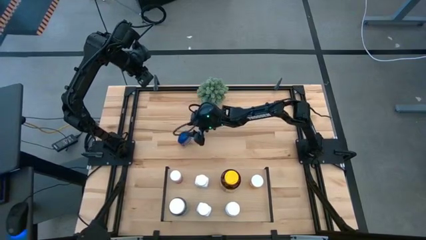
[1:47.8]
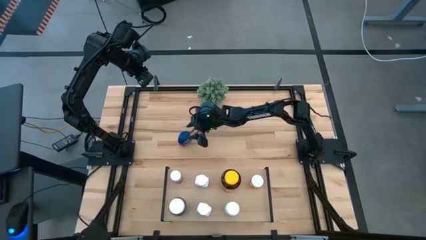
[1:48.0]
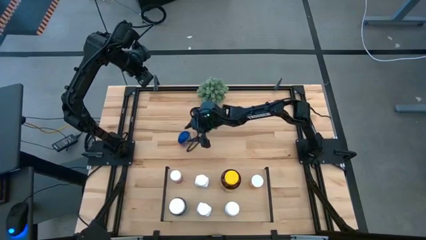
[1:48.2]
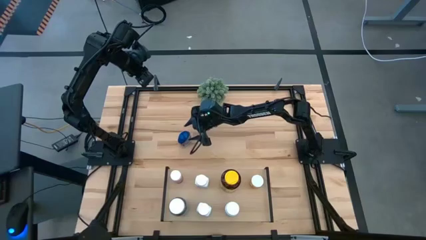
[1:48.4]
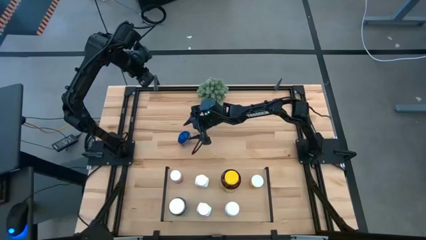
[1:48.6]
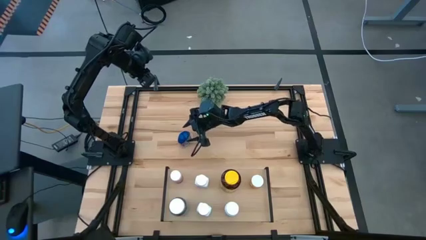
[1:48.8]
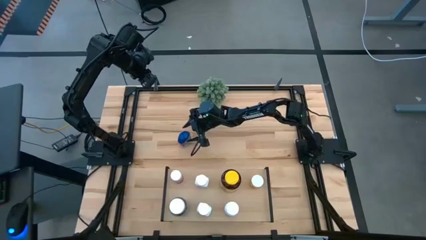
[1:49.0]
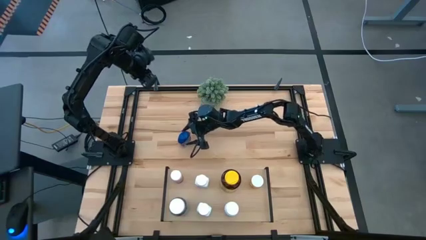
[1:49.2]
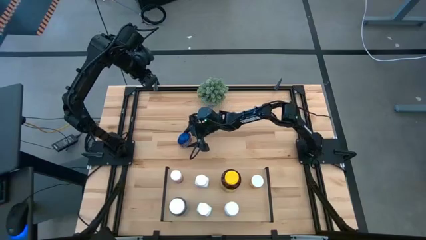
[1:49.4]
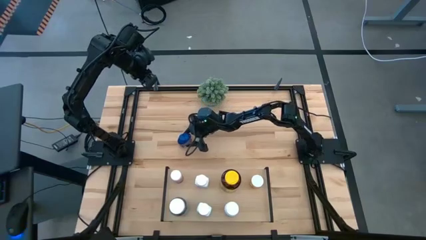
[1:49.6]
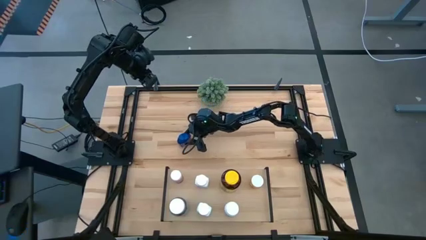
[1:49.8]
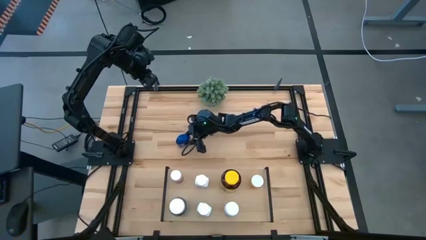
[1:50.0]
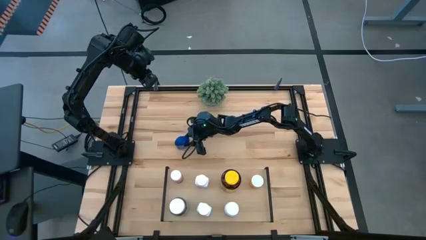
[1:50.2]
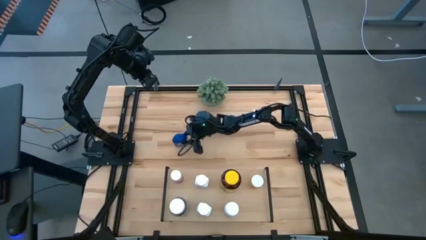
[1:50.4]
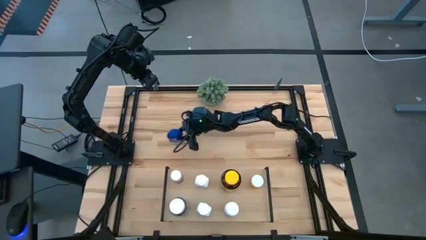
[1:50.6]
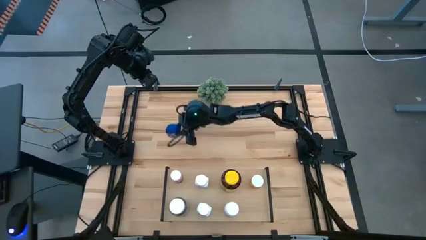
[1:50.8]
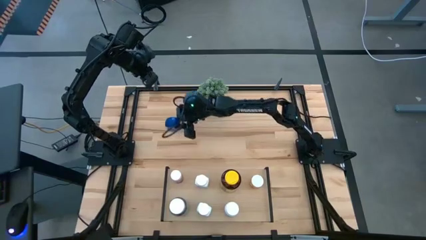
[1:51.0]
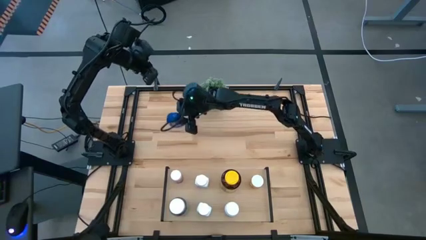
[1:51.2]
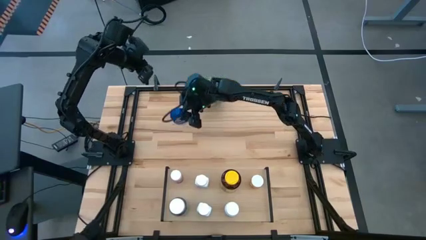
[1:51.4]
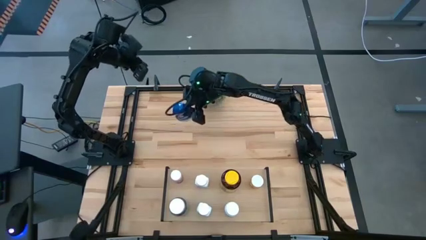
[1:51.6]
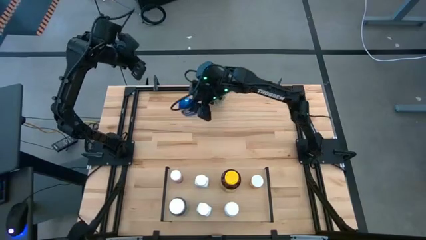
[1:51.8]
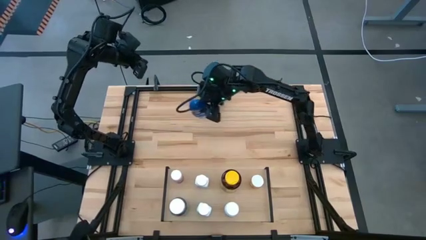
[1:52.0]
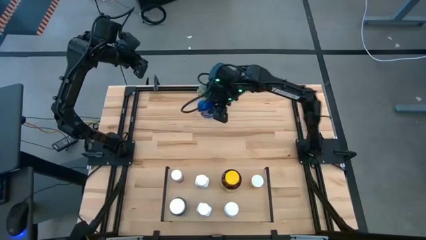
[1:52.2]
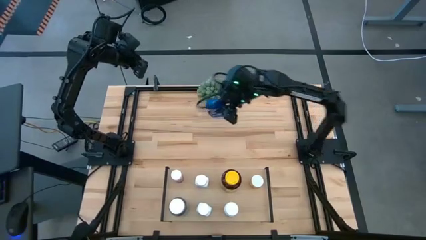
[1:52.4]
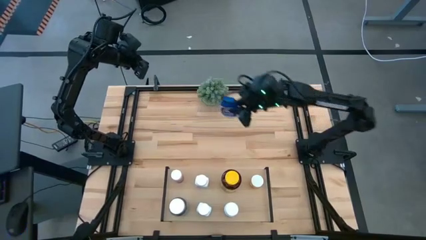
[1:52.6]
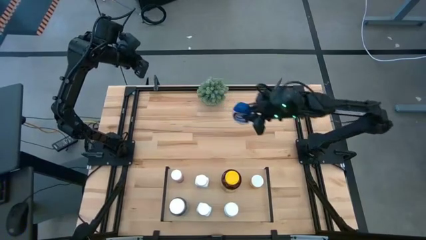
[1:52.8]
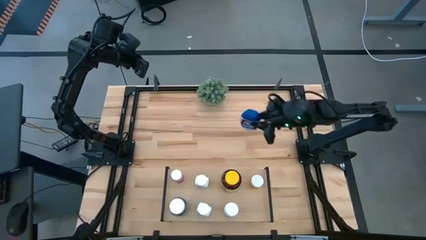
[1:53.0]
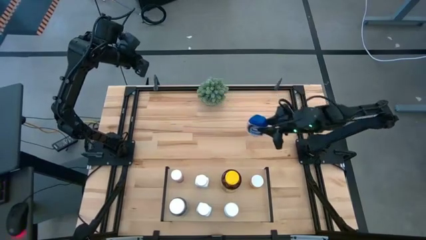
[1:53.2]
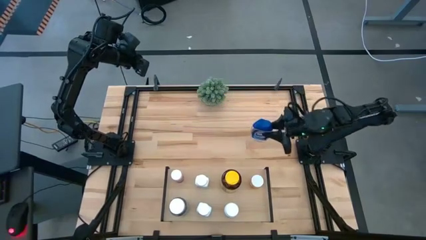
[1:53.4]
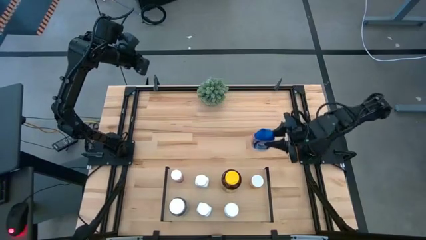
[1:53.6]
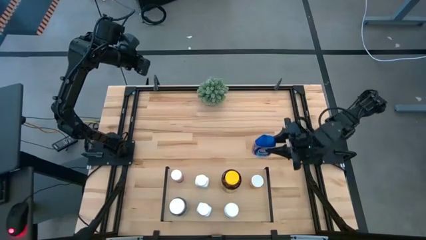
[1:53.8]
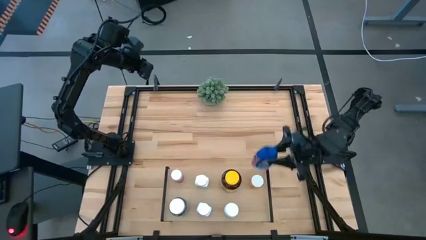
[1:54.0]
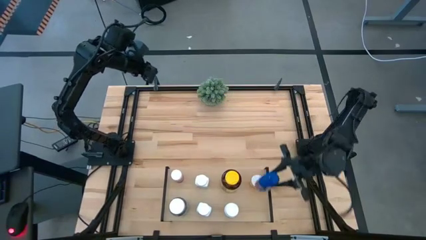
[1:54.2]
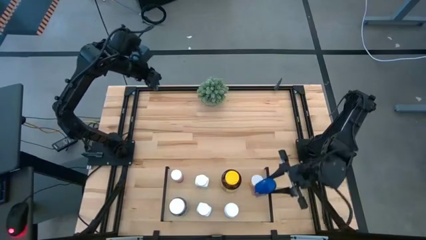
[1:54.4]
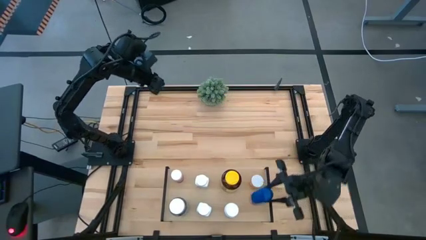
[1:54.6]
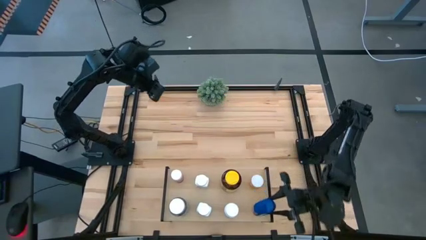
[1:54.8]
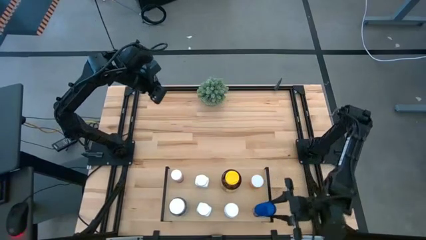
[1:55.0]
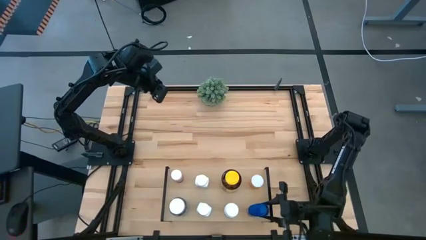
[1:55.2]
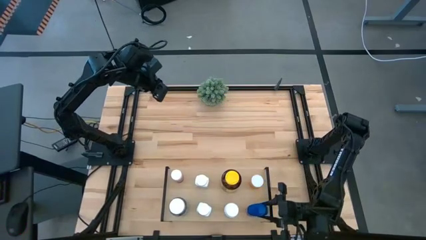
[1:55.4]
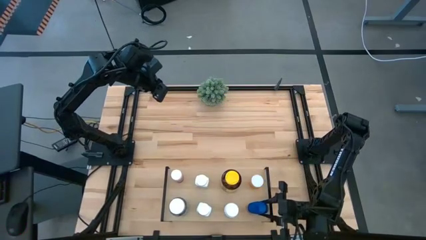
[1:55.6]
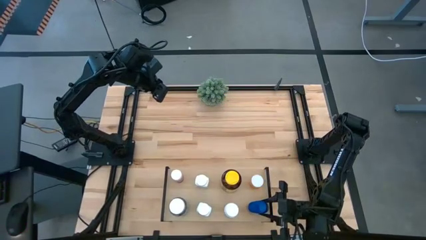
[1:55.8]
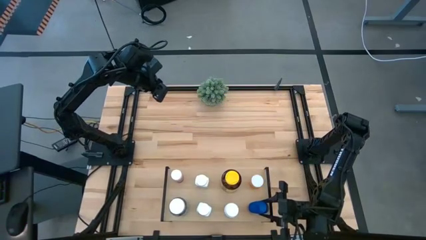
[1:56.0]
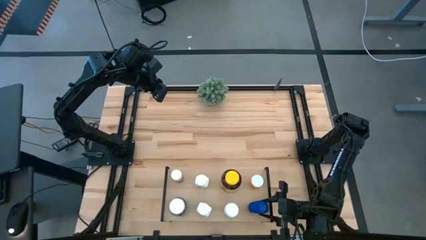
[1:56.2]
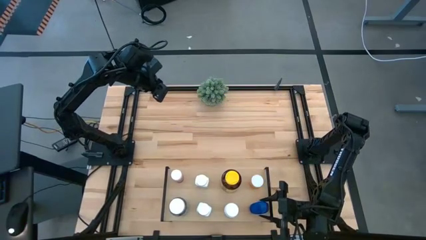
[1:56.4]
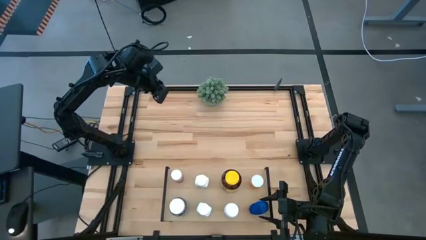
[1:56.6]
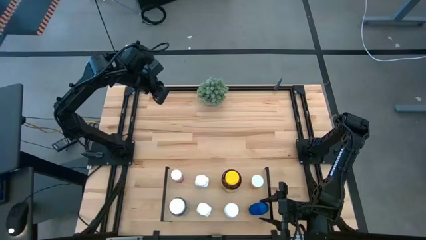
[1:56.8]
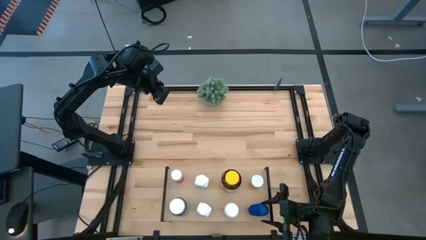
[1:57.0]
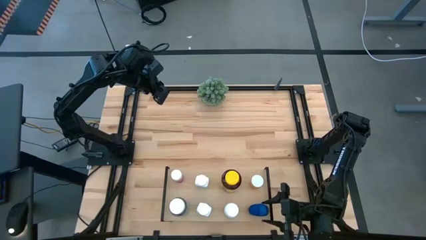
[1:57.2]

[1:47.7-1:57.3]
Task: Pick and place medicine bottles onto shelf by color
Put the blue pill bottle on the shelf

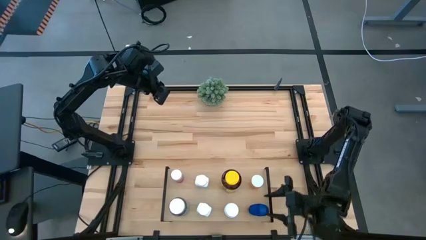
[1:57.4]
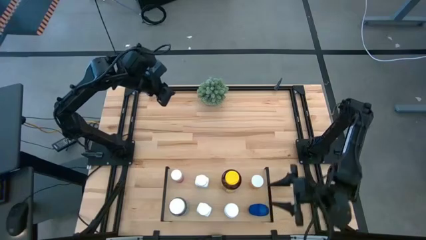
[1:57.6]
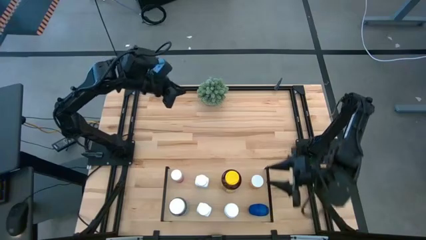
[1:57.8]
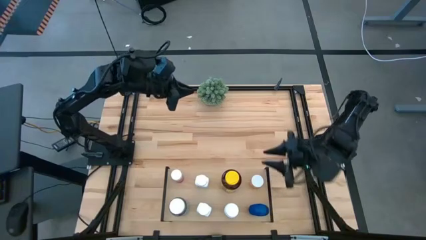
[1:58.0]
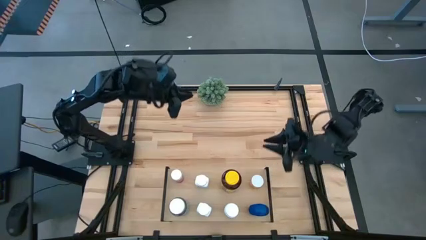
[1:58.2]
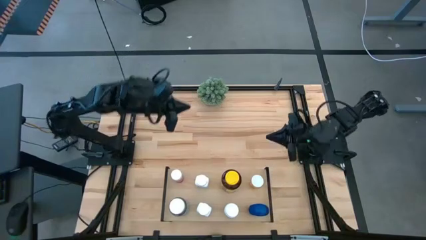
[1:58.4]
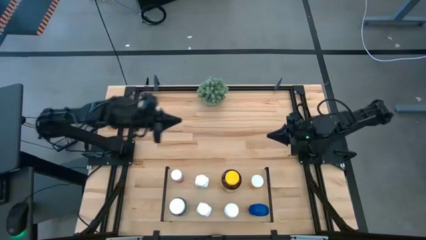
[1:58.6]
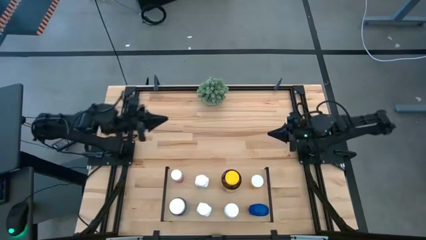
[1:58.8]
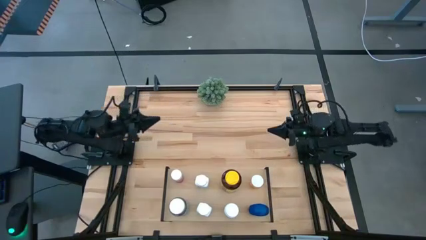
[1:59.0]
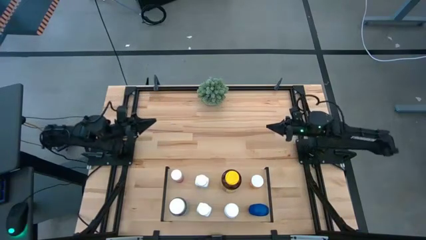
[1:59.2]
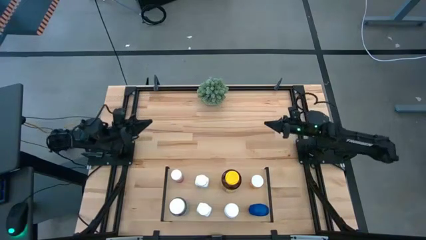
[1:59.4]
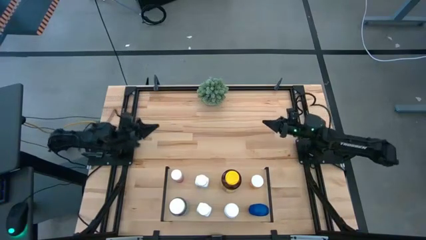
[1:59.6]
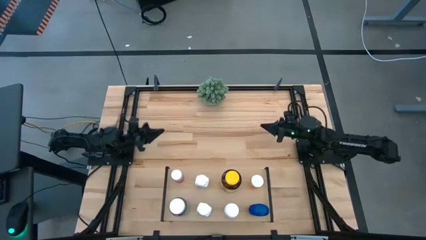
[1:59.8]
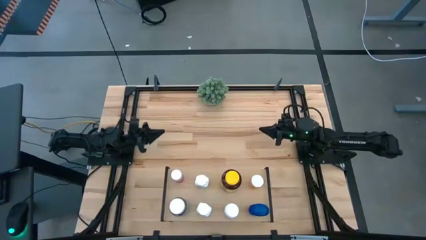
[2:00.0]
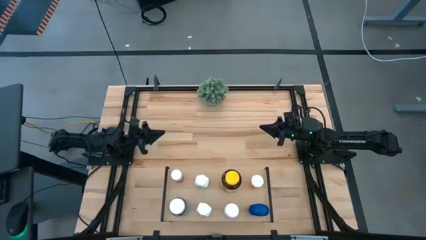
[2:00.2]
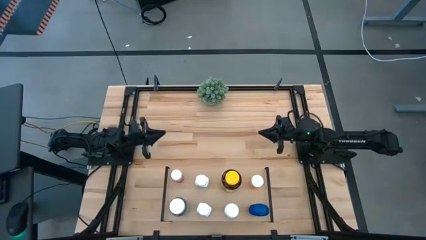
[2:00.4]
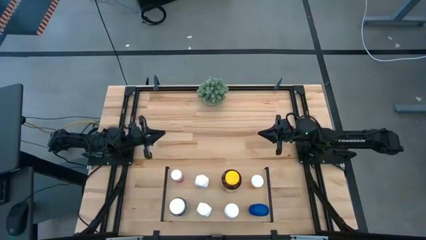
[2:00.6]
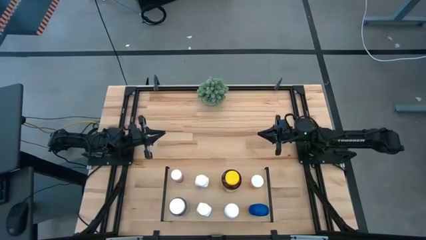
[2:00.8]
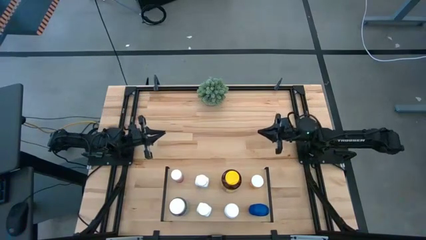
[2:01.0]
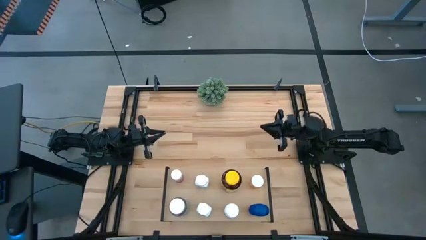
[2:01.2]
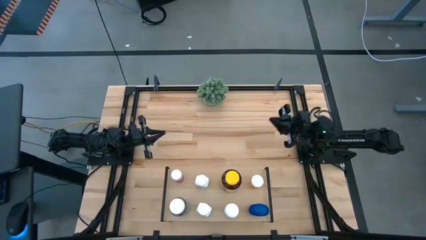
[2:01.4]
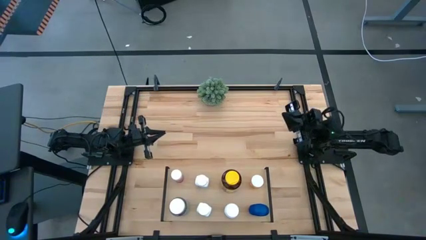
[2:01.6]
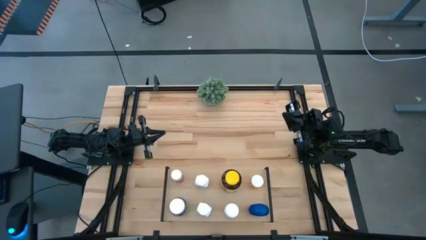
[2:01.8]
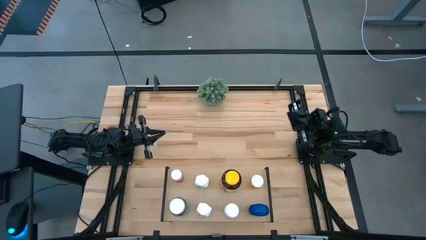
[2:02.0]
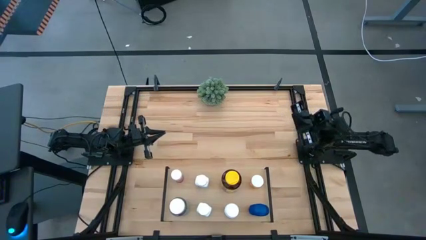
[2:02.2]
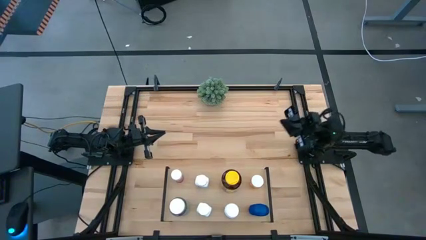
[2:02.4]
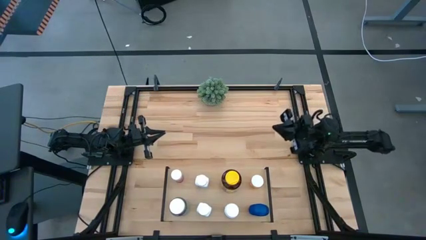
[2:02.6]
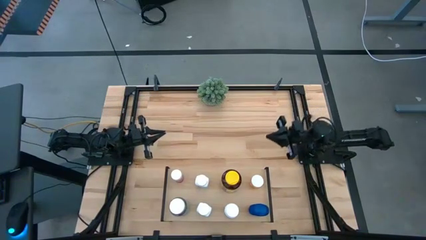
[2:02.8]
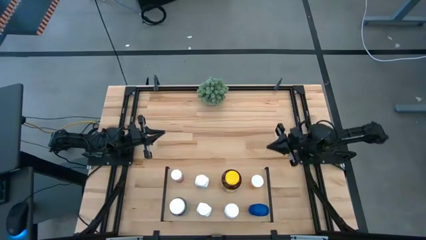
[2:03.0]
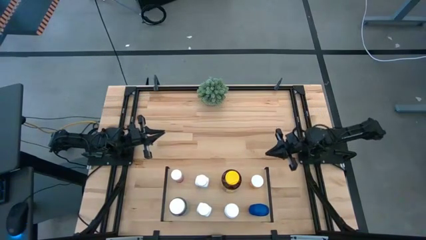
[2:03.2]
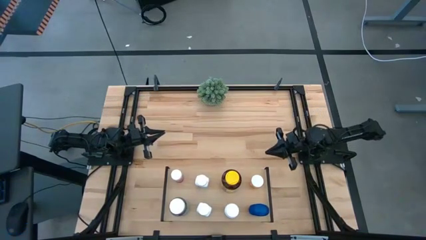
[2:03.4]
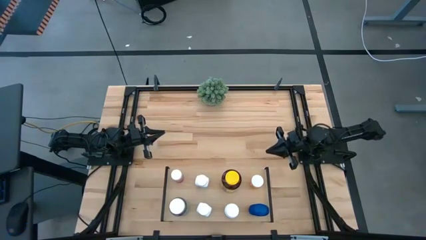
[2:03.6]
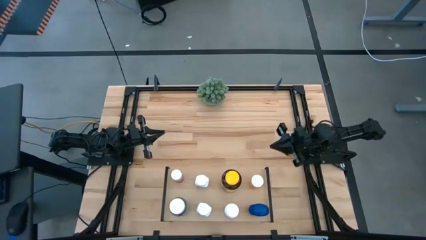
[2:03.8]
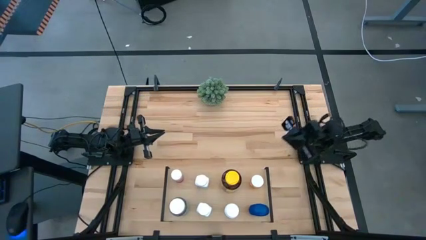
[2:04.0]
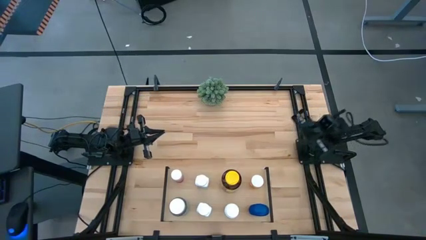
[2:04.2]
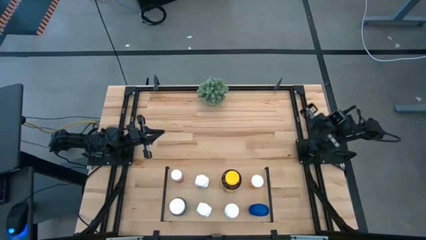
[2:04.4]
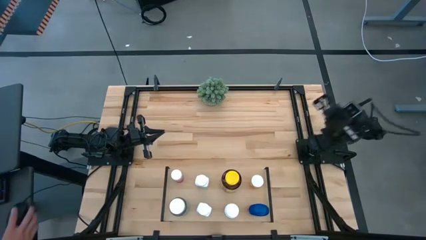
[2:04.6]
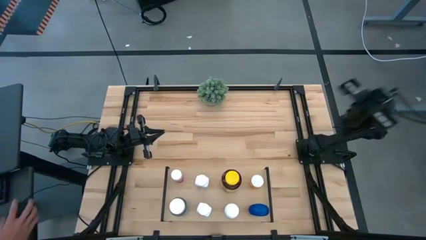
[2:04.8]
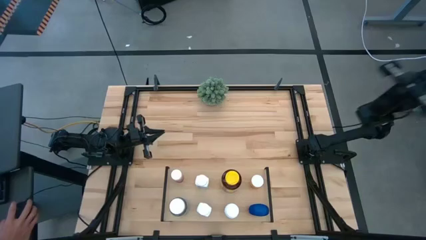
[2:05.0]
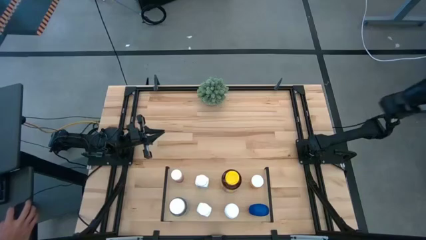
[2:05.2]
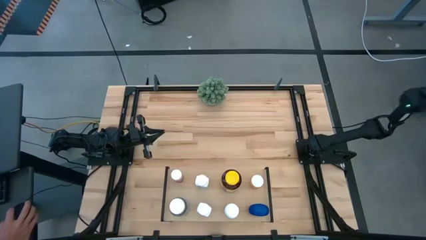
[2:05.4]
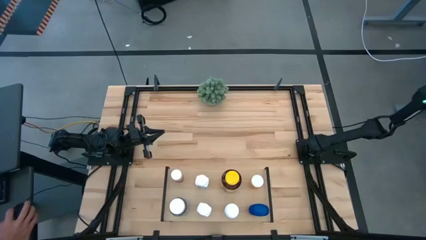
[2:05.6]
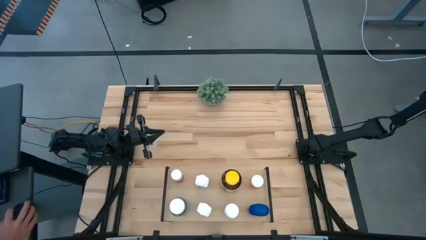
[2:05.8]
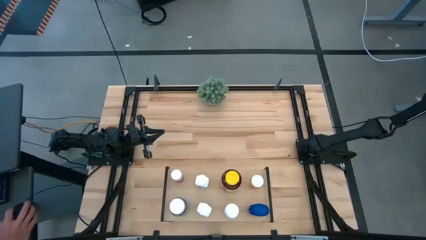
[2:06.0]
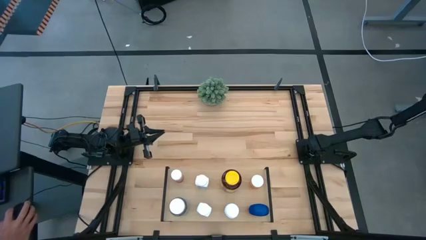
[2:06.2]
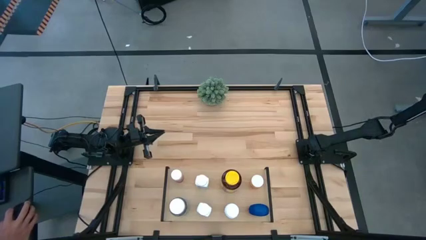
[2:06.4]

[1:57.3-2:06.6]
Return to Home Position
